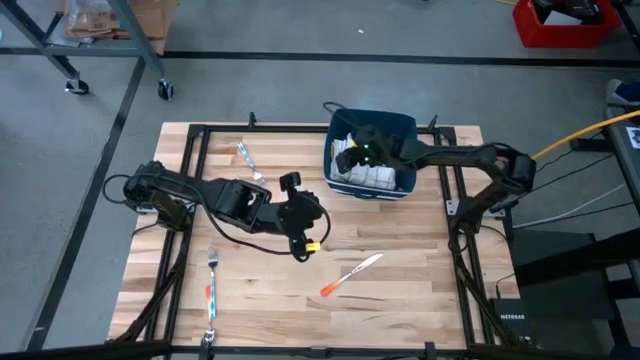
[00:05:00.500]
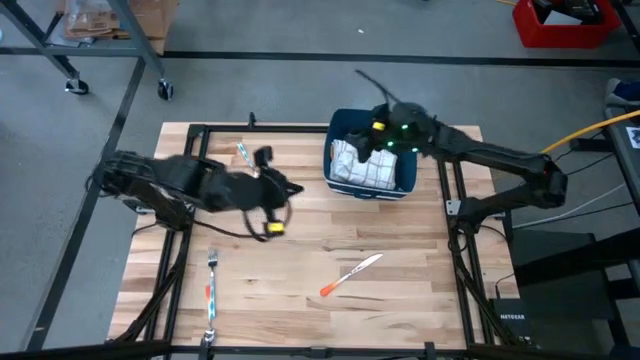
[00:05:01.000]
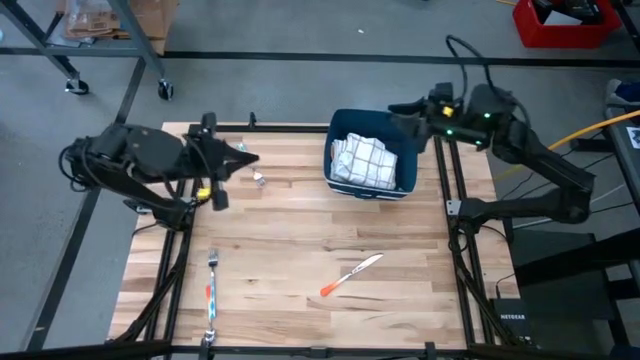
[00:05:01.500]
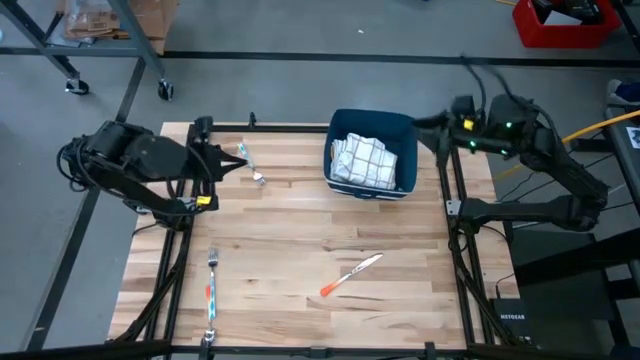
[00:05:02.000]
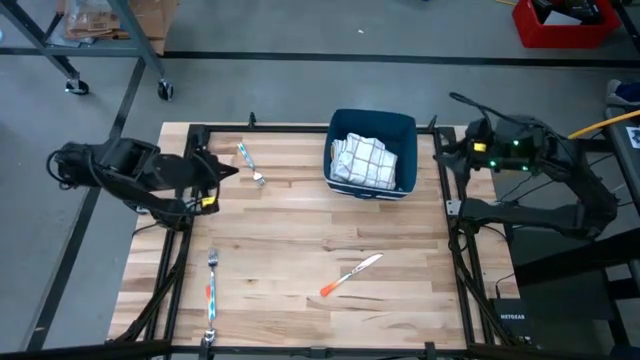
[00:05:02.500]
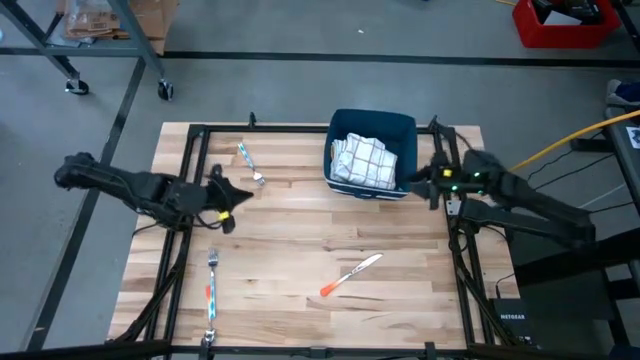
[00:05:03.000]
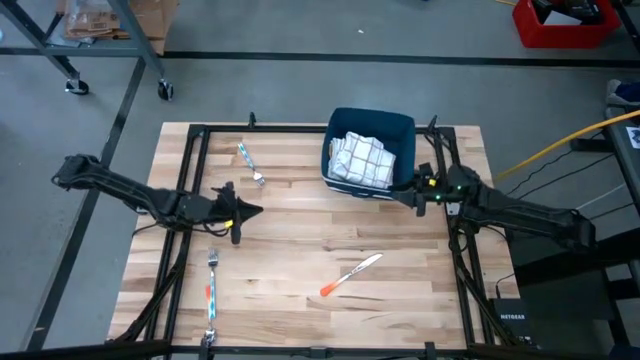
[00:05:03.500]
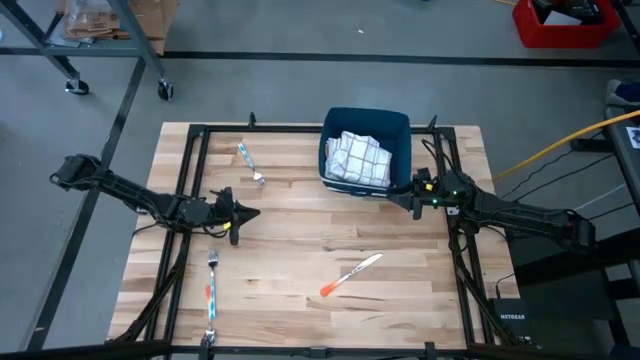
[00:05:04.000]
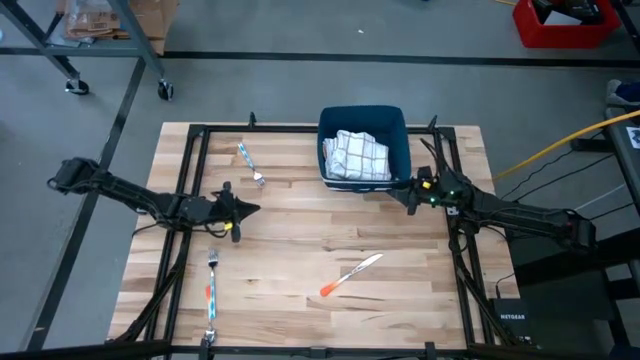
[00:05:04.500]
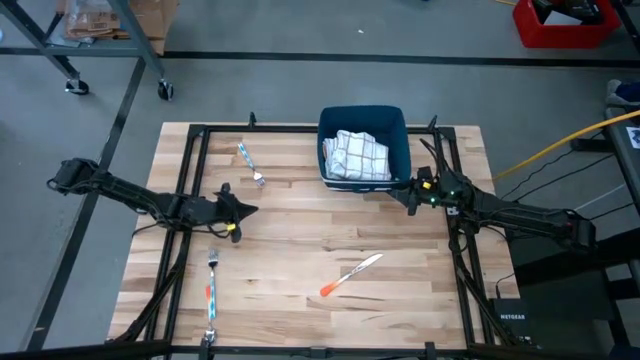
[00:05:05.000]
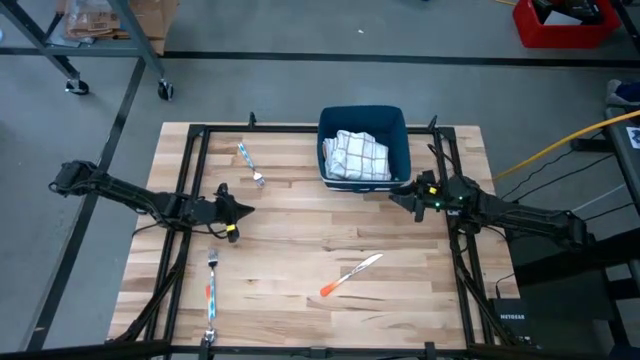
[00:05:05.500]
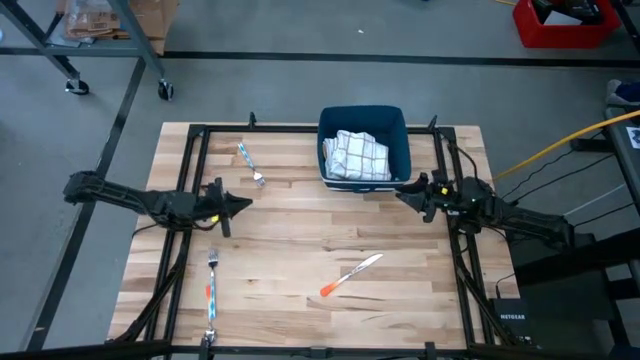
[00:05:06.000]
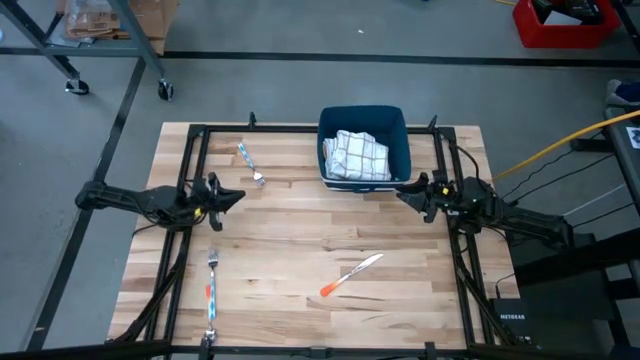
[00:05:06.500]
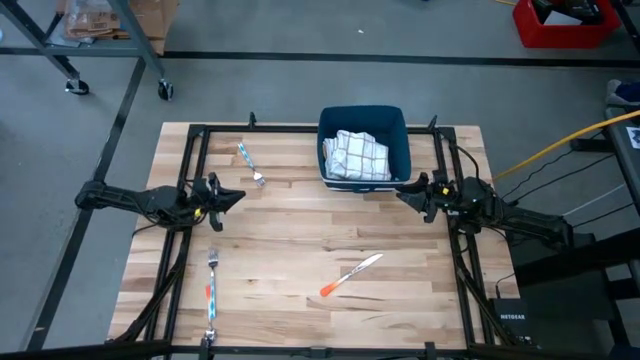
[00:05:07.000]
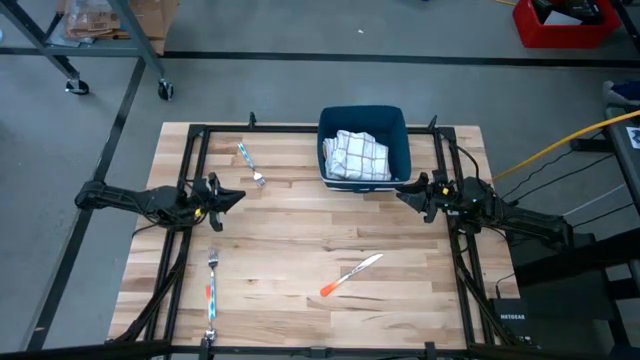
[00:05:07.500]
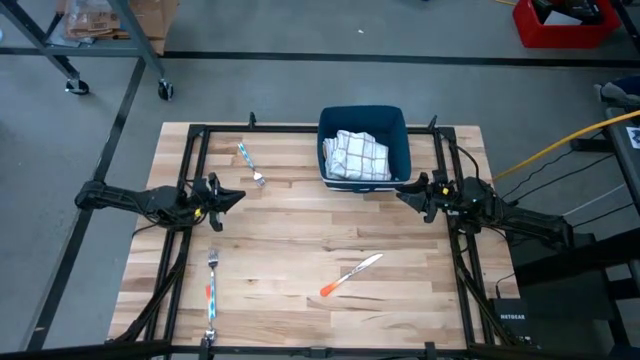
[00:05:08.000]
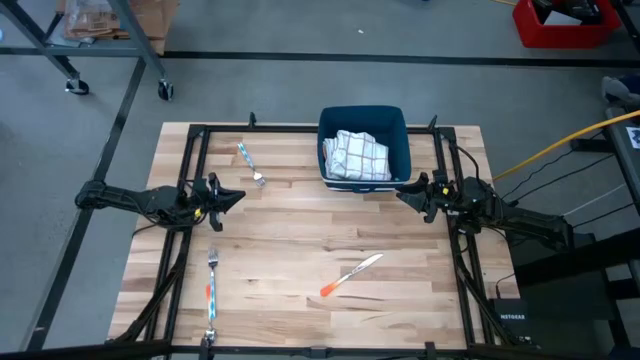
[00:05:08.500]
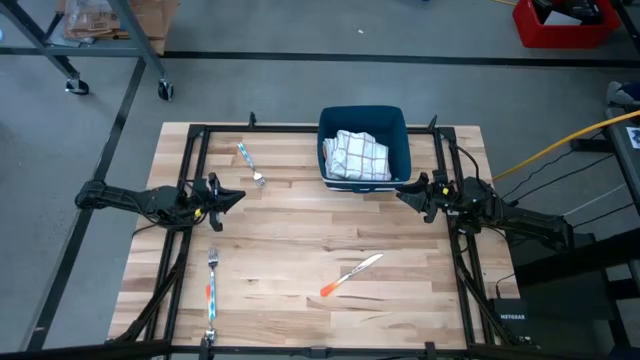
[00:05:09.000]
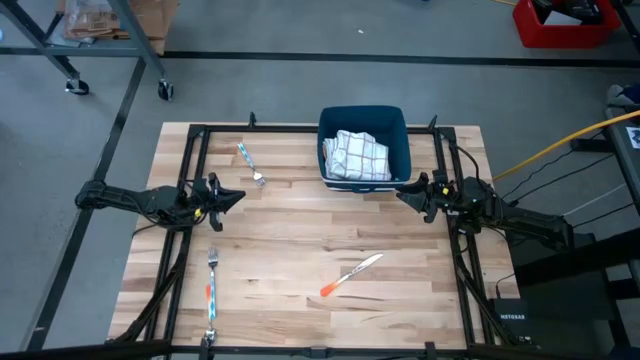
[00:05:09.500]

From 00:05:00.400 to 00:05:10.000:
Task: Fold towel
Return to Home Position

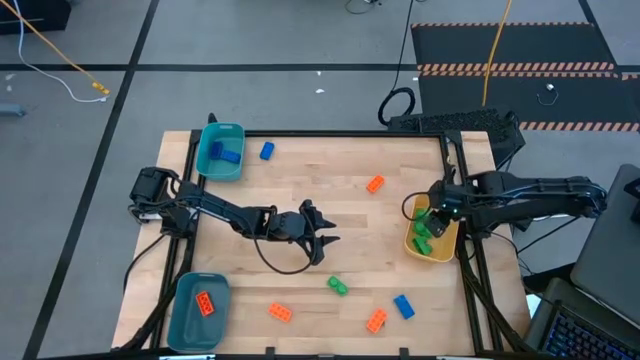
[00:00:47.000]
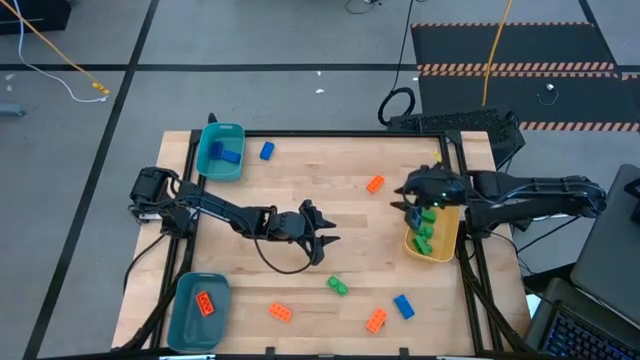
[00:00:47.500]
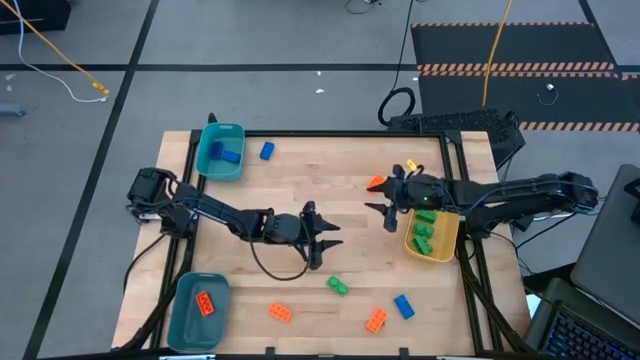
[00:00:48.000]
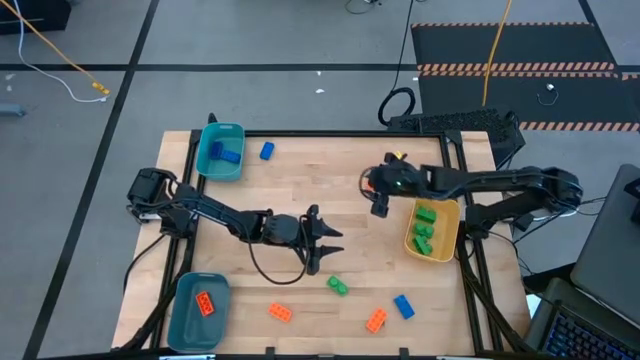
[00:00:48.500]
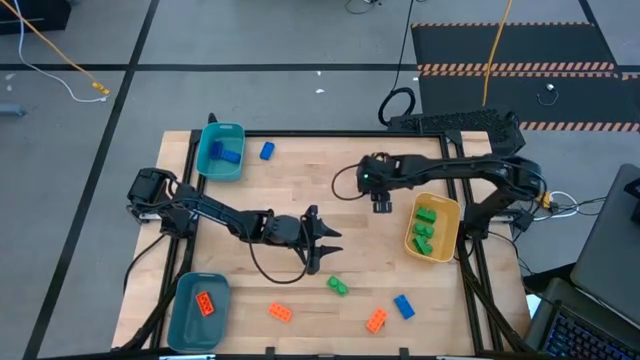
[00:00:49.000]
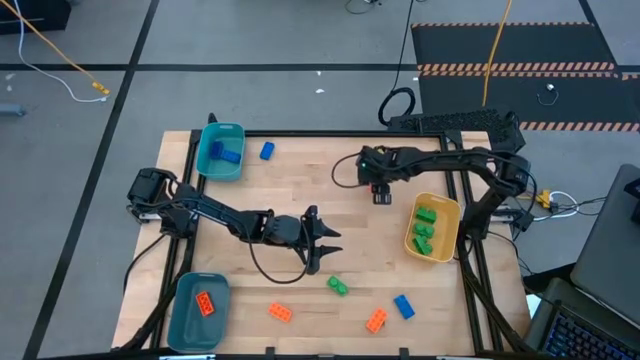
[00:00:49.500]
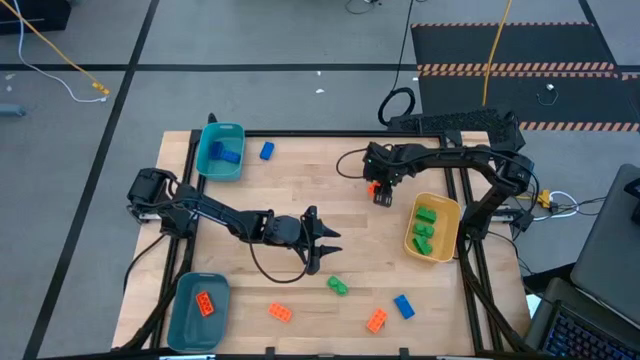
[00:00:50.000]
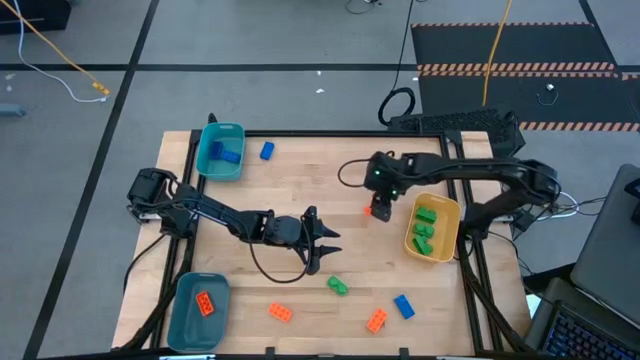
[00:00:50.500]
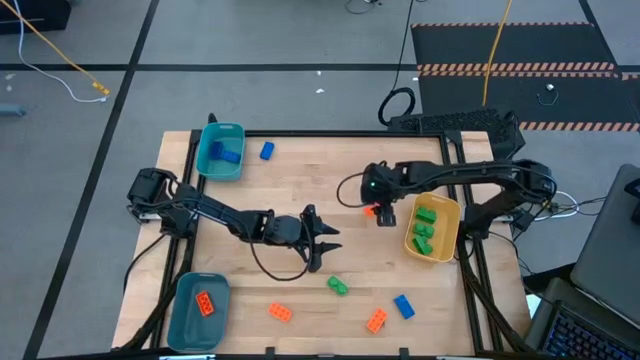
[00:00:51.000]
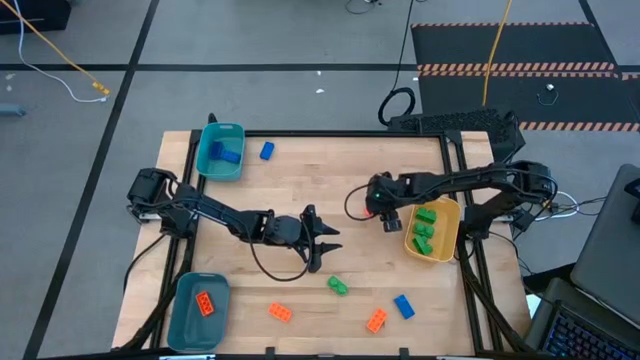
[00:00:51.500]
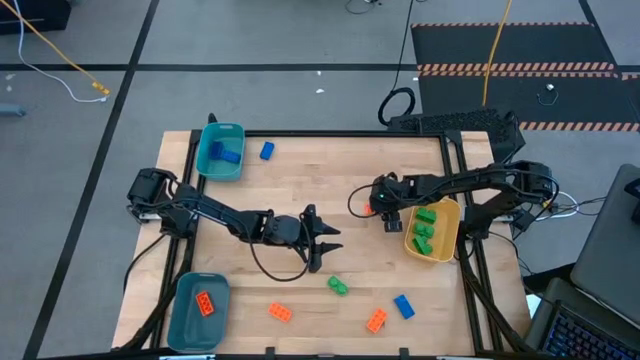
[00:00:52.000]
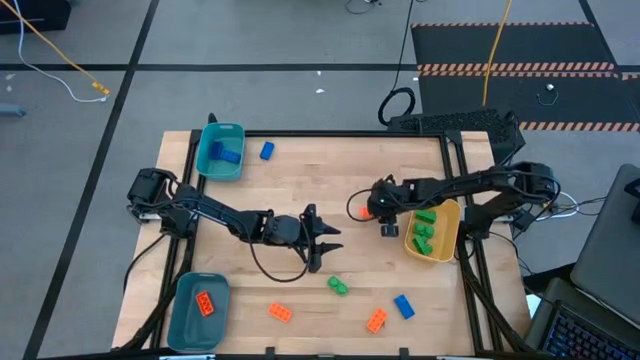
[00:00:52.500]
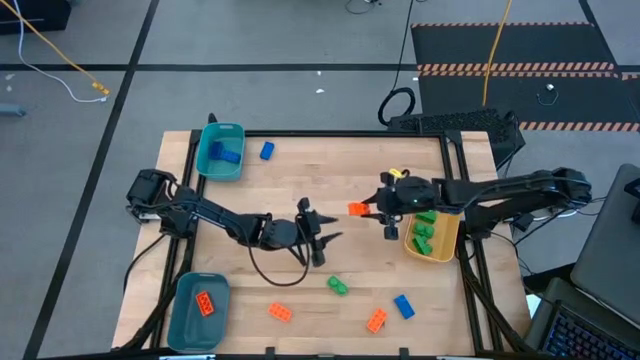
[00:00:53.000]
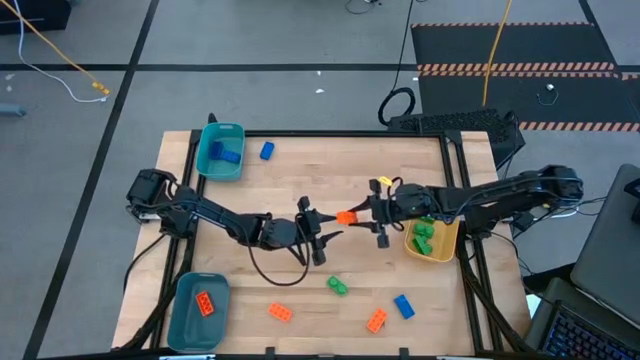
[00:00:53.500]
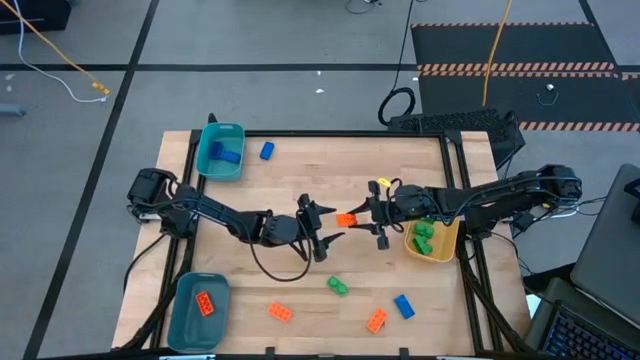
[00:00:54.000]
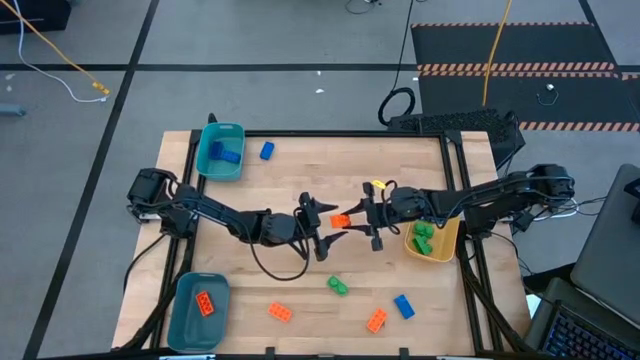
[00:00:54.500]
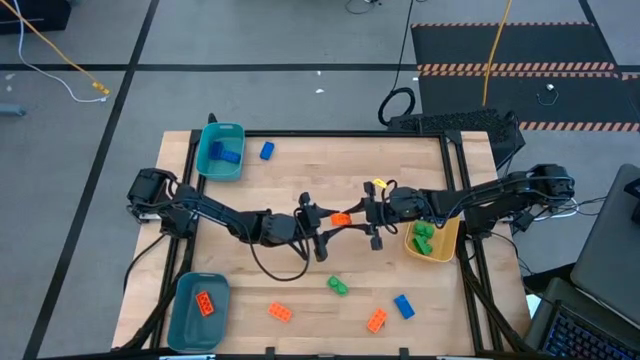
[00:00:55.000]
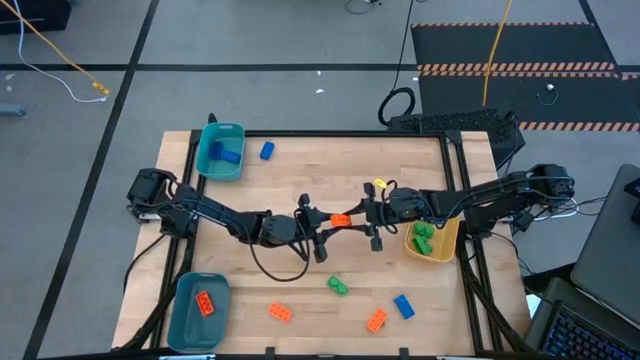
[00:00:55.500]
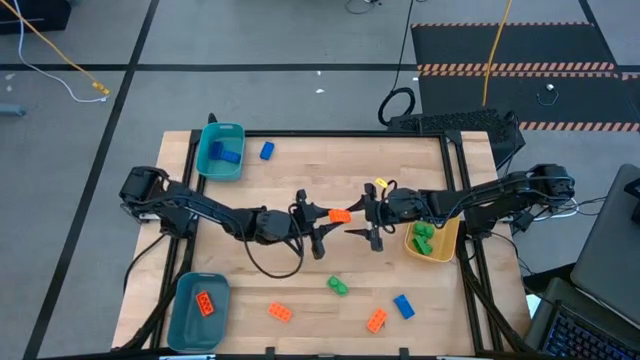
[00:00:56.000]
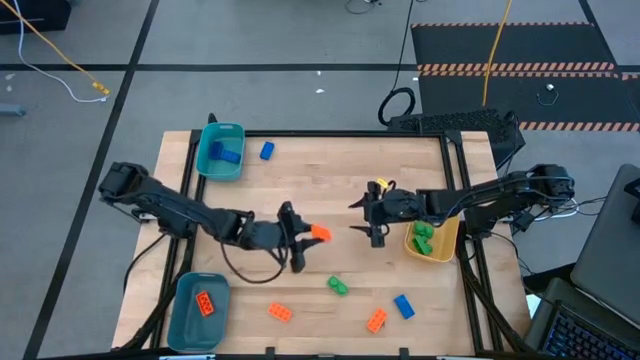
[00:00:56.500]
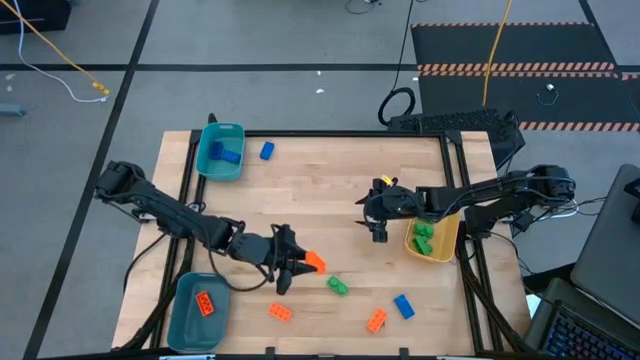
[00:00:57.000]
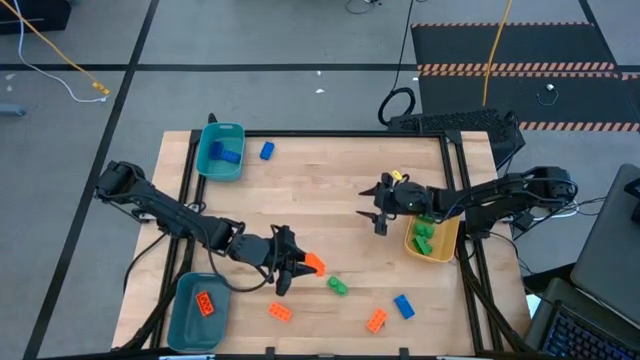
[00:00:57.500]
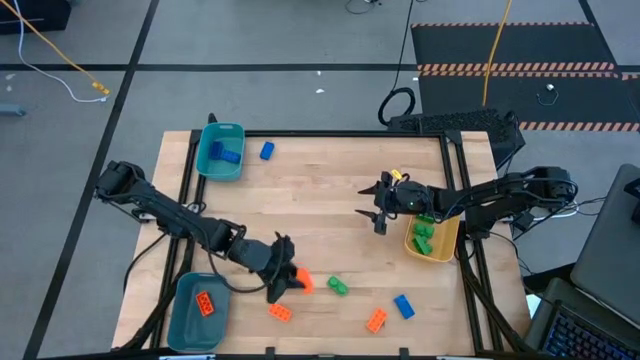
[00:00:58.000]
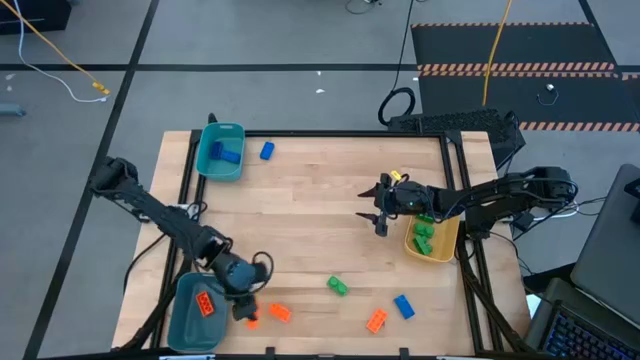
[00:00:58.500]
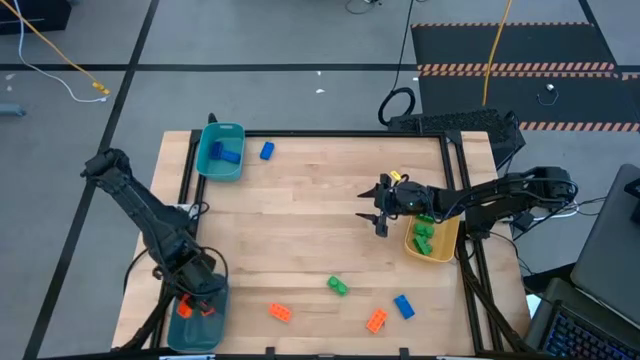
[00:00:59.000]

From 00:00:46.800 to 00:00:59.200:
Task: Sort & place blocks by color
Put the orange game piece into the dark blue bin
